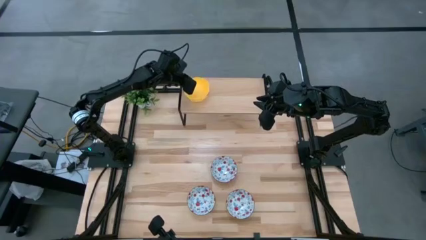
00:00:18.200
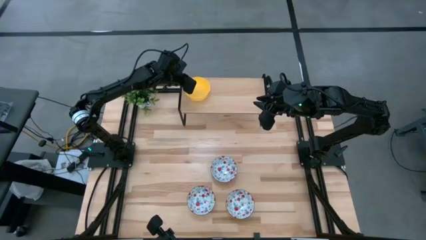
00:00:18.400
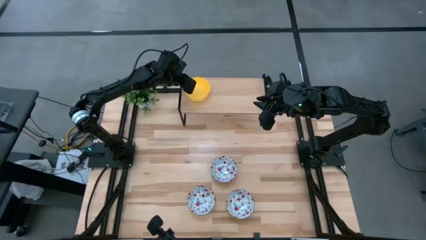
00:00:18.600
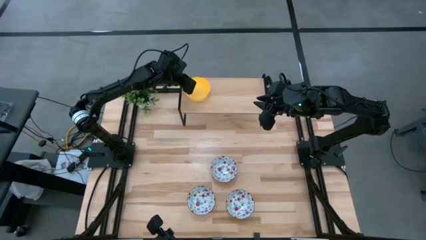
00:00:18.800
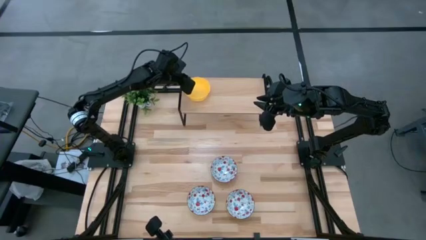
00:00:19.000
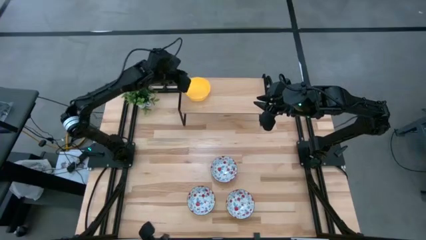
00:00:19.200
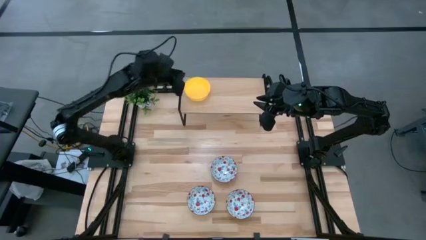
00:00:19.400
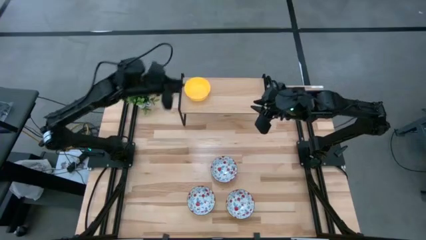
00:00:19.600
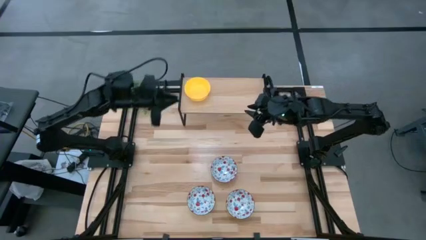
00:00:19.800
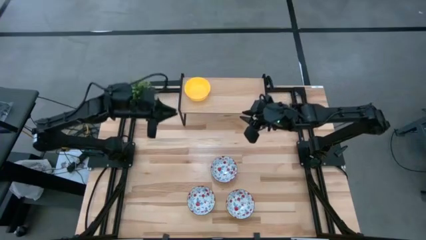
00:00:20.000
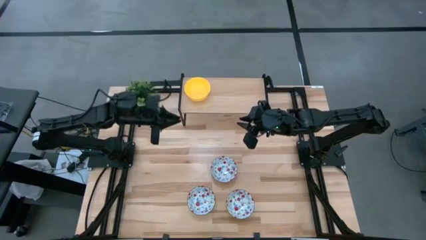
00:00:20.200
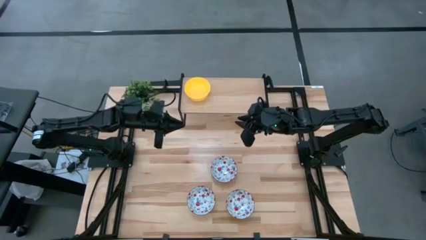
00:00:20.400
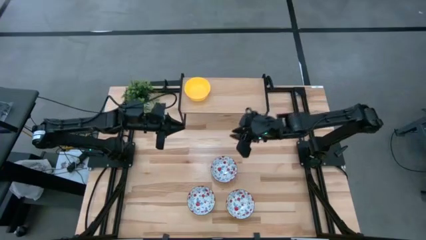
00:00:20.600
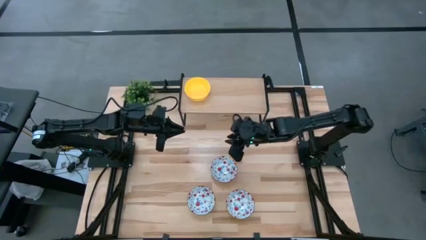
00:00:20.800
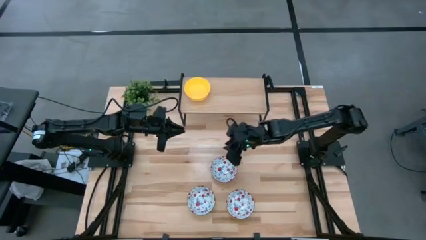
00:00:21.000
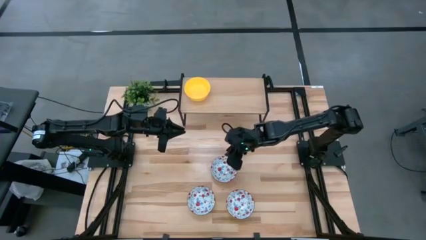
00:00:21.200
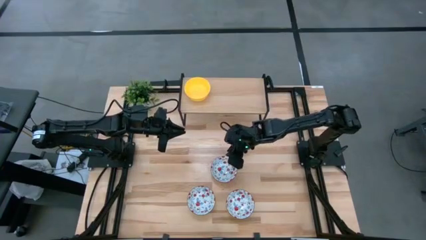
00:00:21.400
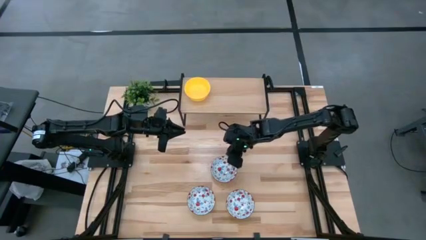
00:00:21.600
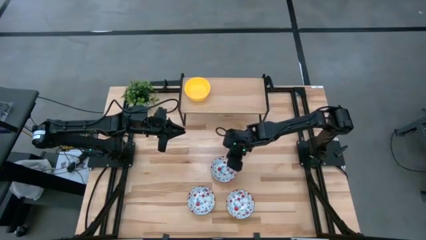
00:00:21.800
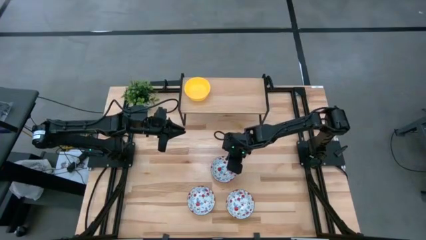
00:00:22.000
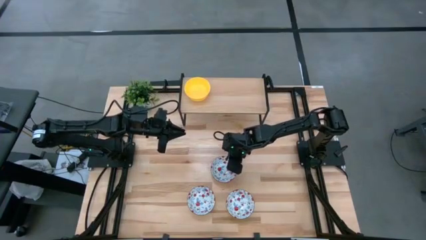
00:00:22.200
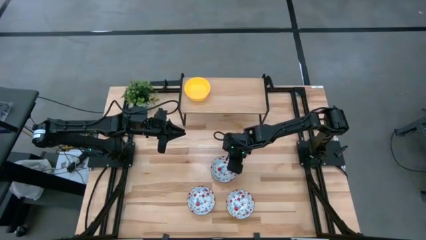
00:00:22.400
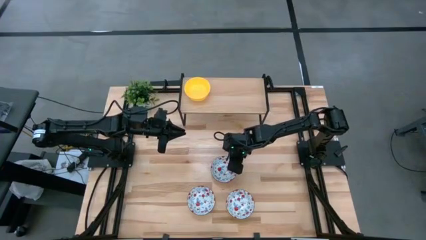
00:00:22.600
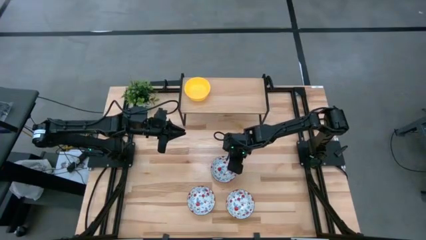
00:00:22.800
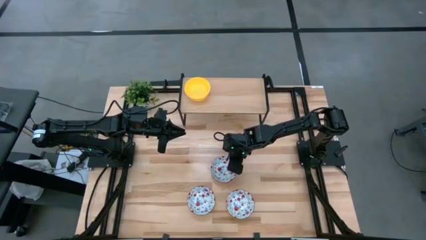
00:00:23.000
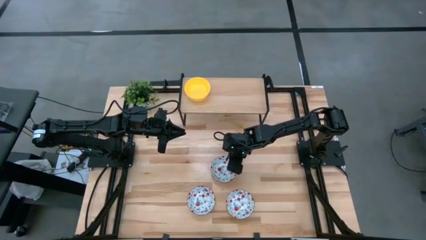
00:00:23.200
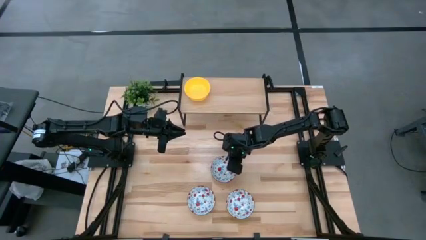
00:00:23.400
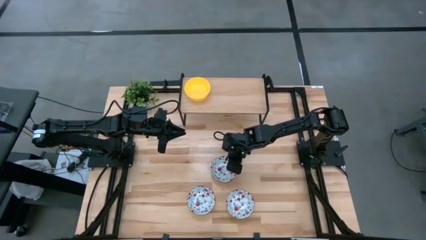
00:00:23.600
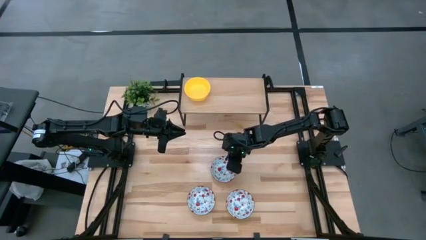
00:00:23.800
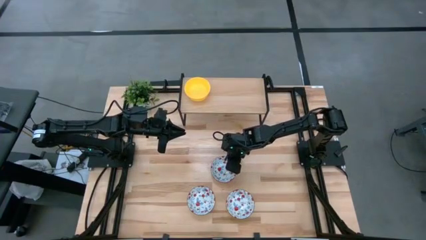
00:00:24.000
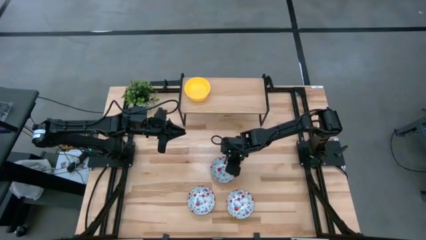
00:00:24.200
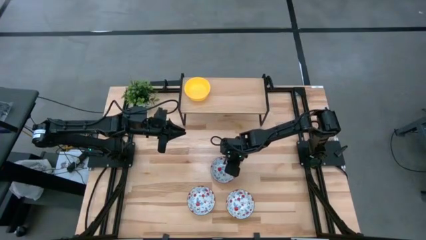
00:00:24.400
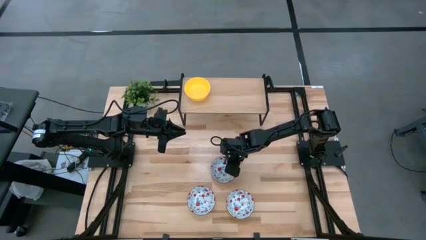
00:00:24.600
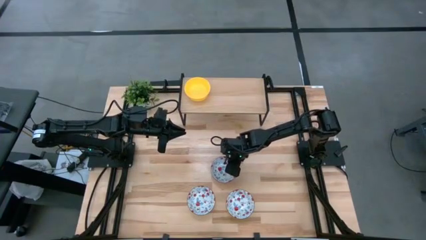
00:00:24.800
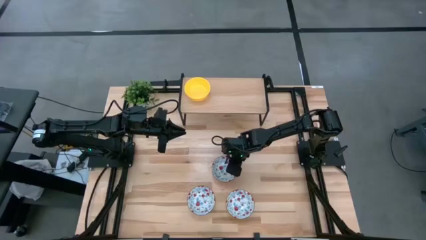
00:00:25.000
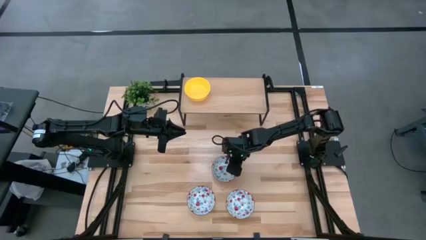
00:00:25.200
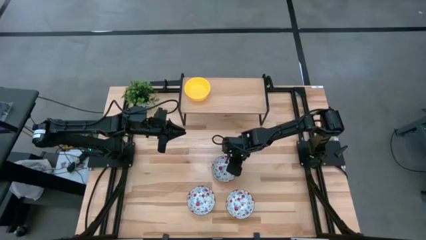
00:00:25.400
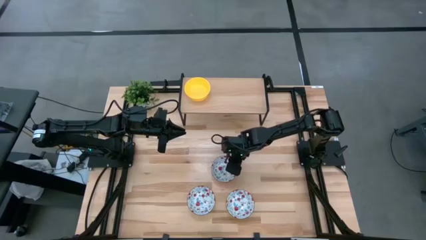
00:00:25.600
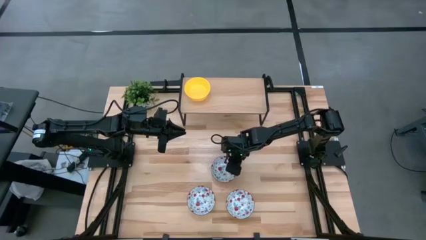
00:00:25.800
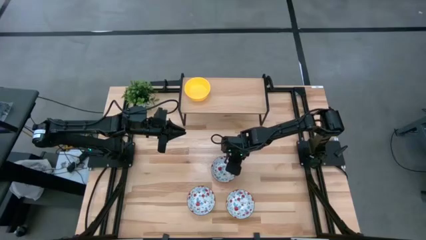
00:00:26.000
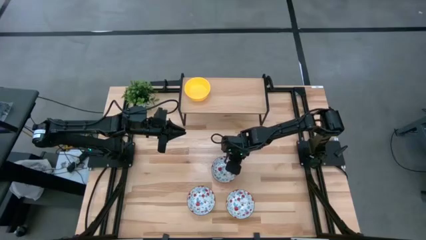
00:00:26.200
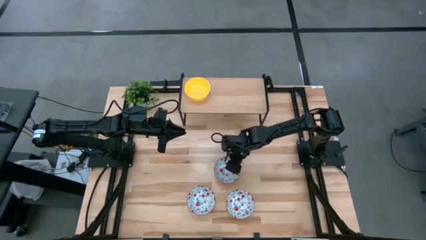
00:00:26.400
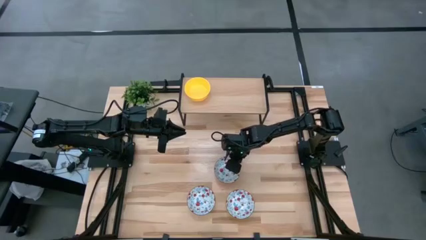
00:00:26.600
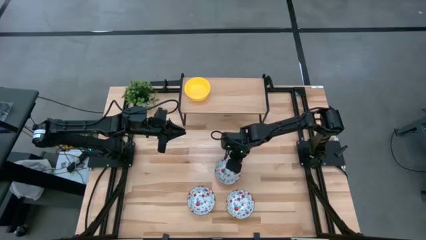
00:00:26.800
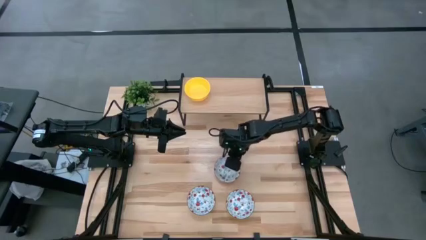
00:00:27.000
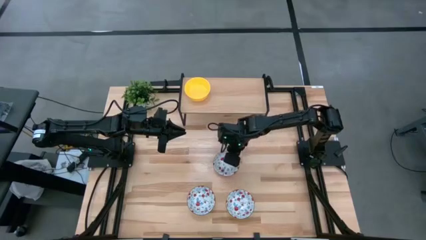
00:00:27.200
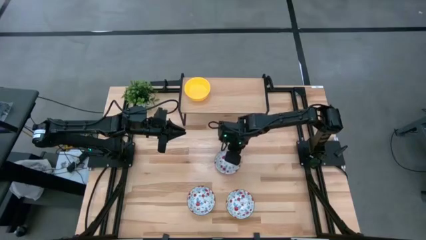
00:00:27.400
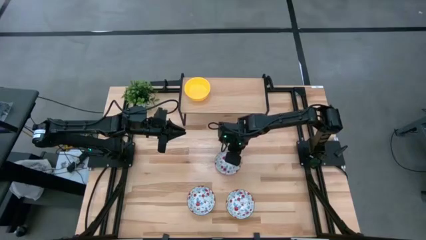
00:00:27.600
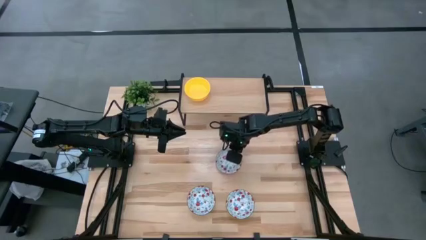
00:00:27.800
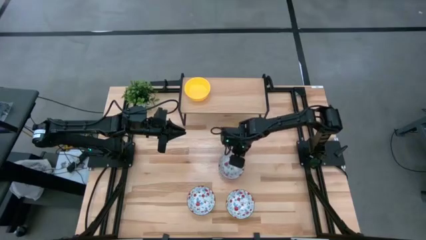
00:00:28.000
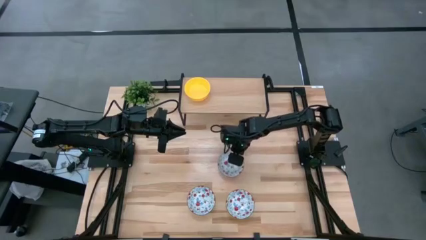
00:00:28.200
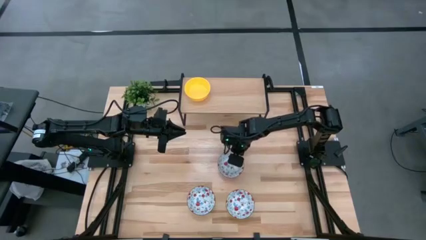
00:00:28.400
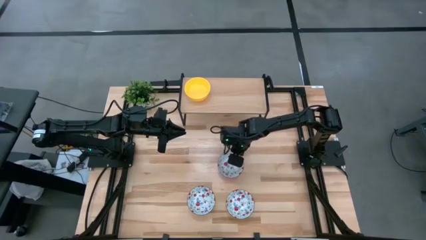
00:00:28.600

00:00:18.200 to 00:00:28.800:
Task: Pick & Place Mini bowls
Put the top white bowl on the shelf
